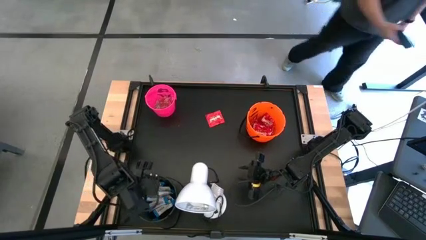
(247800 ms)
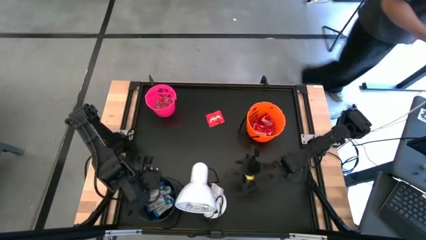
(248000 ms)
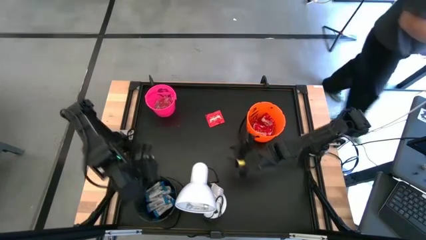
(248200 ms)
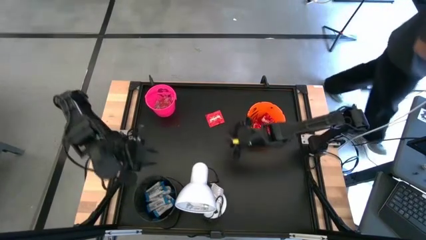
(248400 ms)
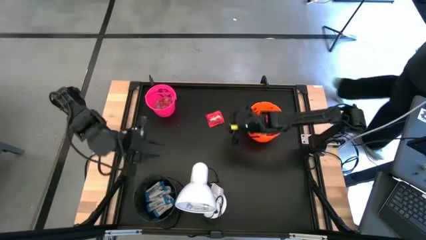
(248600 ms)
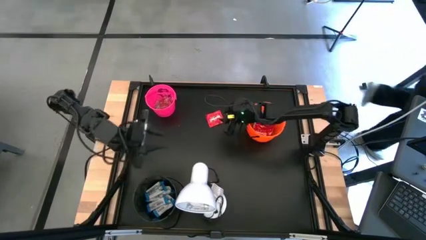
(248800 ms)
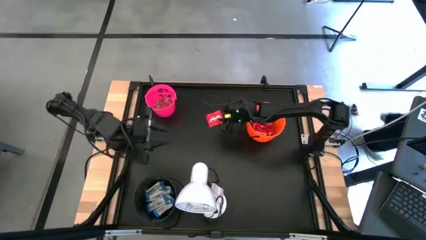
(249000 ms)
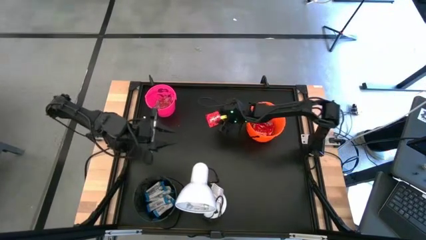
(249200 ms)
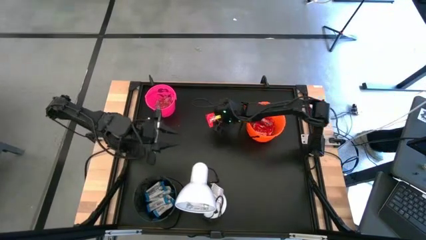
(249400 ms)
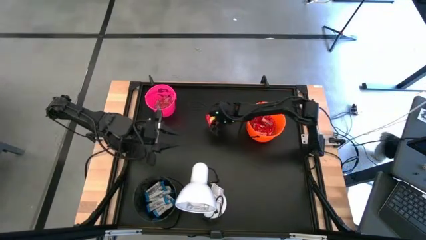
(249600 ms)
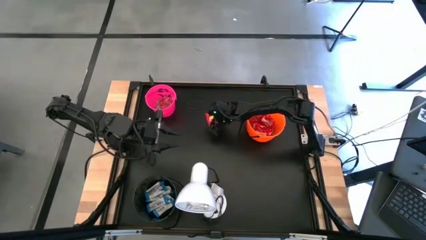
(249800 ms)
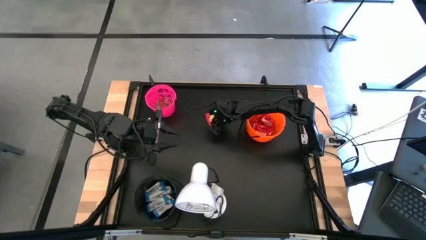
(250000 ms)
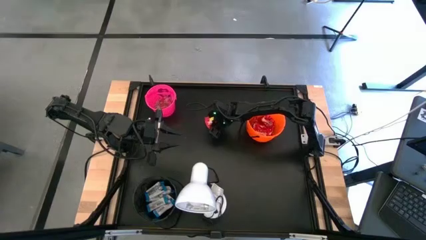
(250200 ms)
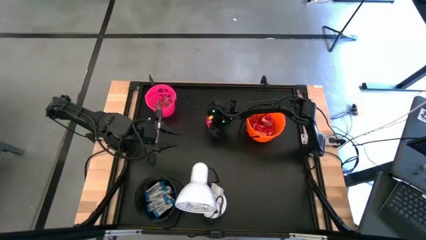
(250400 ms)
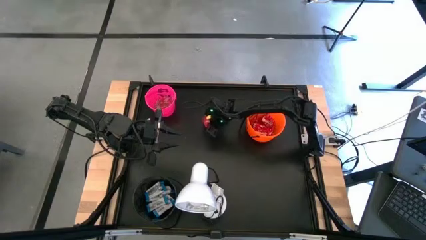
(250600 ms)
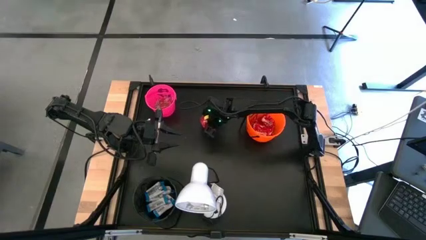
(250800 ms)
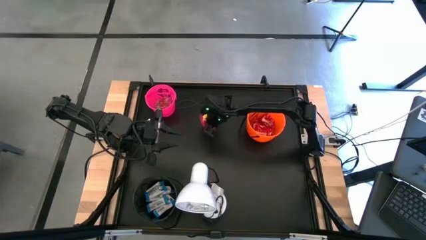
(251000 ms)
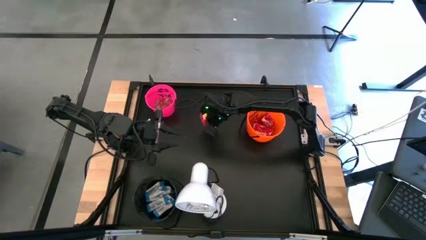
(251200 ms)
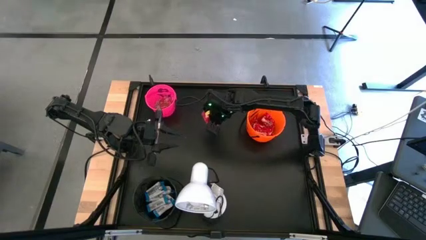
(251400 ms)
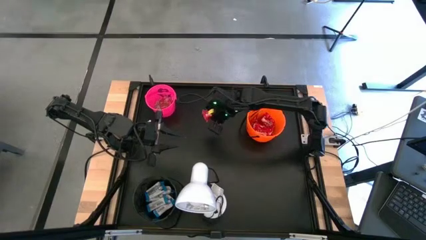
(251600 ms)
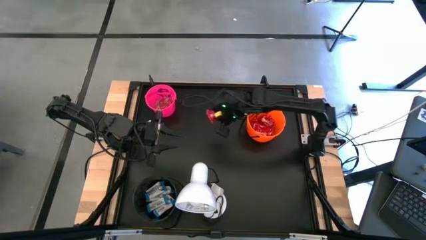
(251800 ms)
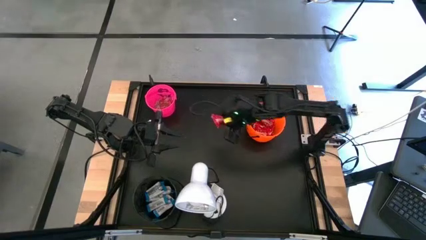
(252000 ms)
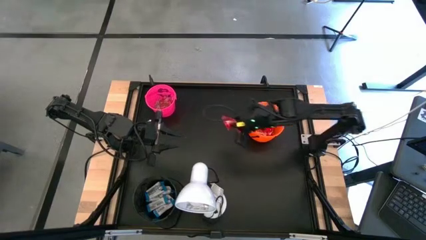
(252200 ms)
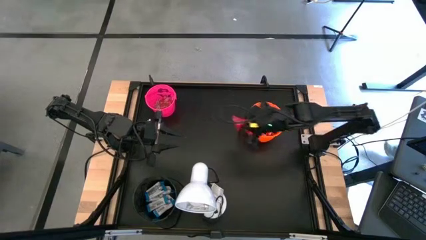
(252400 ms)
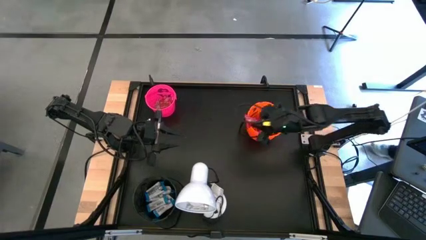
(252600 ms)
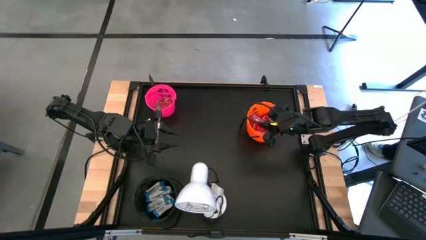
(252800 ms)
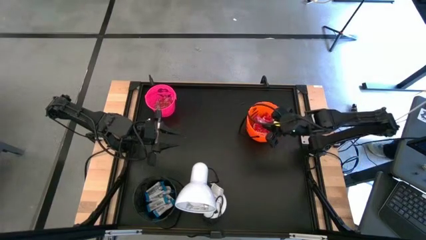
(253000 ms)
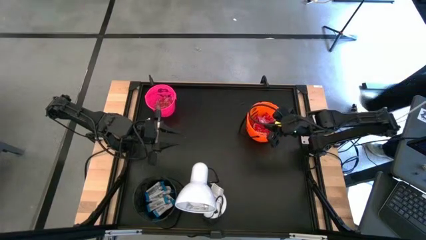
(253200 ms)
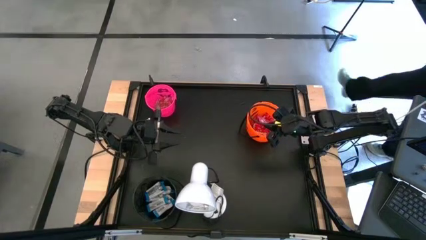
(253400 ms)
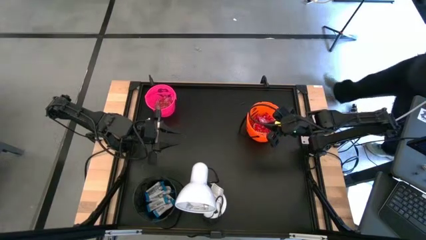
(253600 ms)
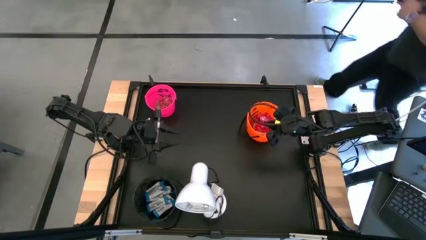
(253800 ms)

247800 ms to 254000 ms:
Task: Sort candy
Put the red candy into the orange bucket

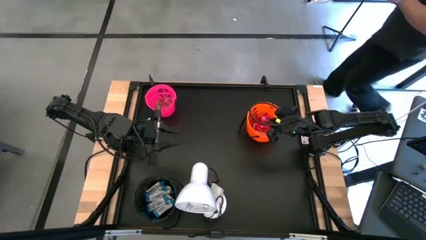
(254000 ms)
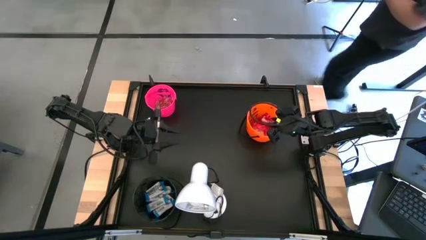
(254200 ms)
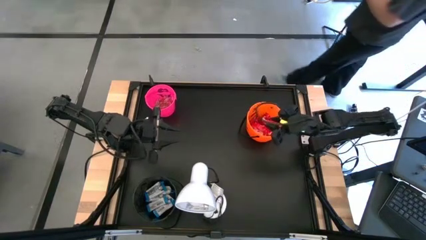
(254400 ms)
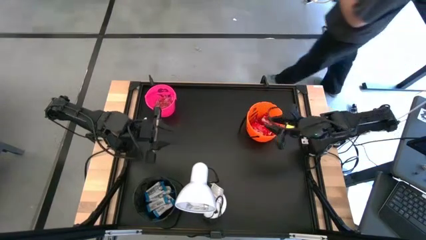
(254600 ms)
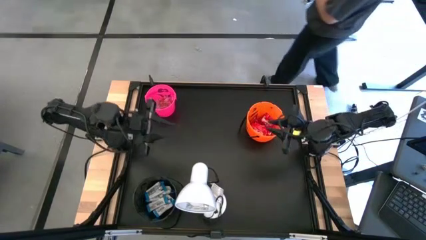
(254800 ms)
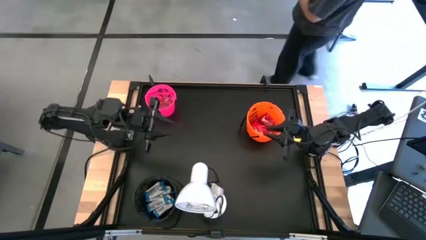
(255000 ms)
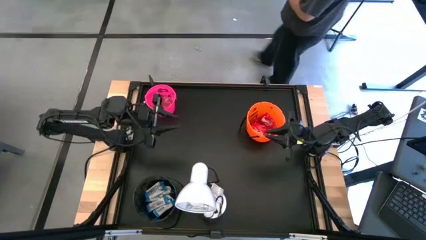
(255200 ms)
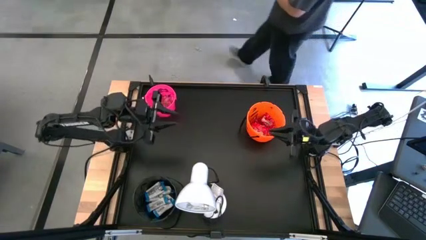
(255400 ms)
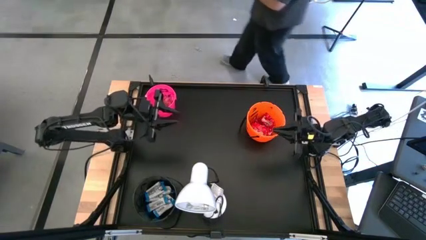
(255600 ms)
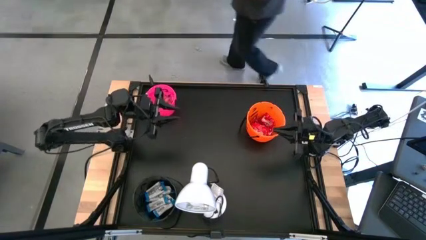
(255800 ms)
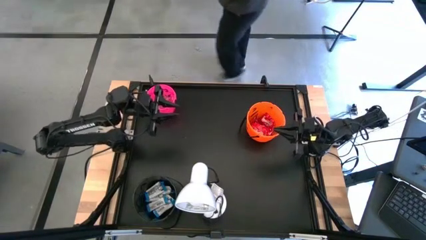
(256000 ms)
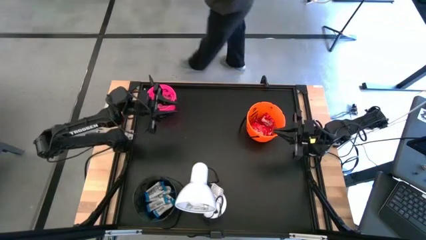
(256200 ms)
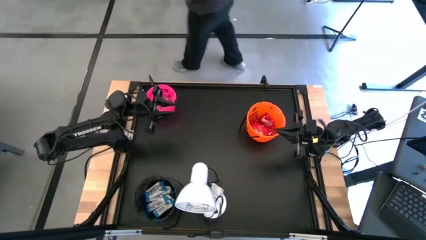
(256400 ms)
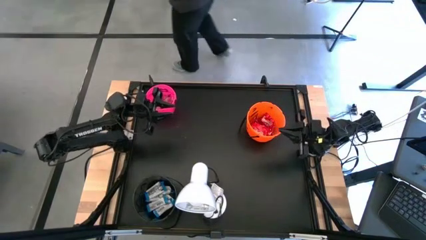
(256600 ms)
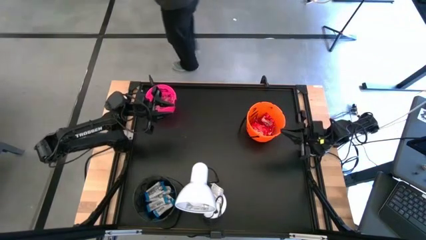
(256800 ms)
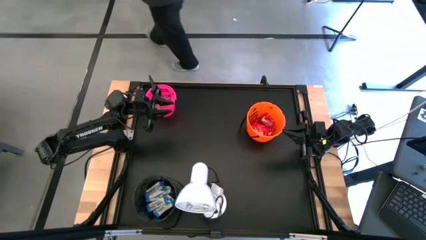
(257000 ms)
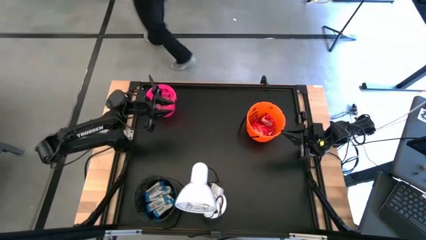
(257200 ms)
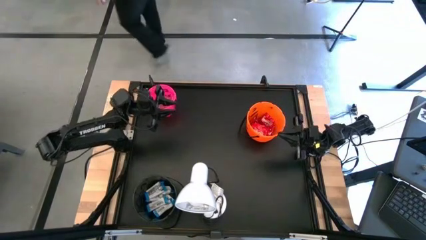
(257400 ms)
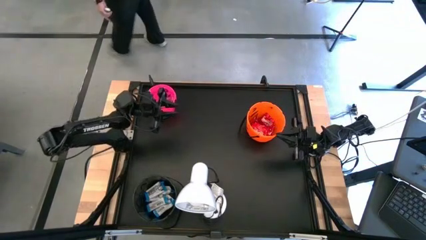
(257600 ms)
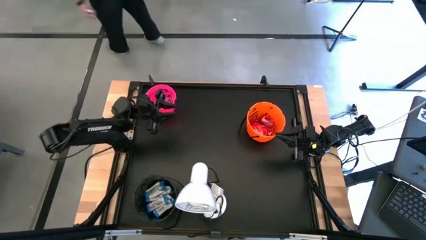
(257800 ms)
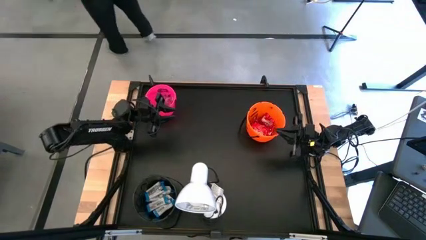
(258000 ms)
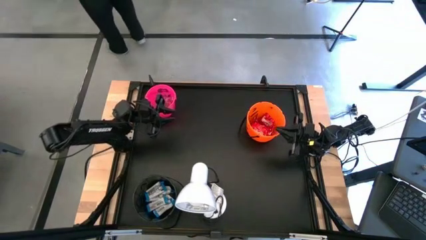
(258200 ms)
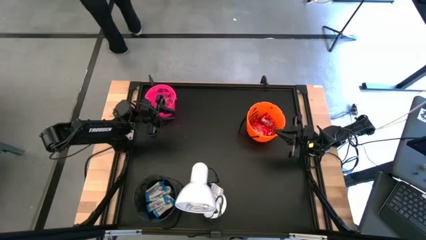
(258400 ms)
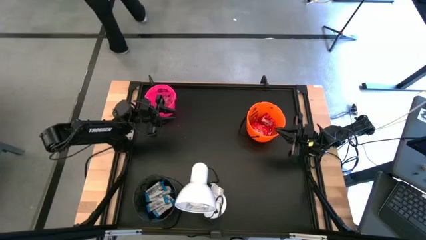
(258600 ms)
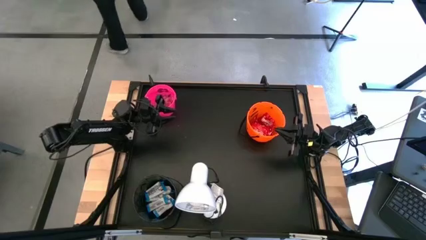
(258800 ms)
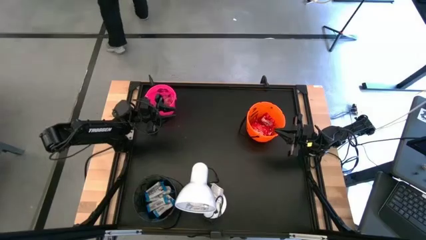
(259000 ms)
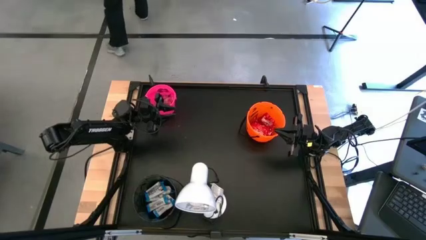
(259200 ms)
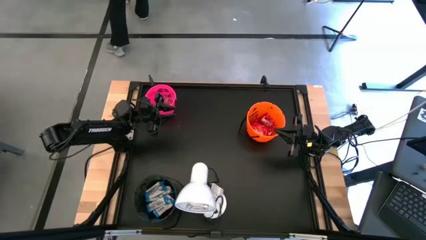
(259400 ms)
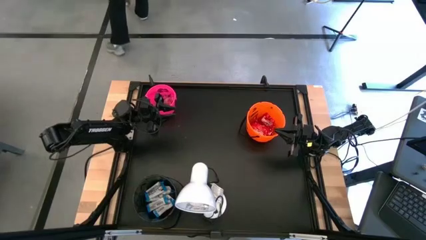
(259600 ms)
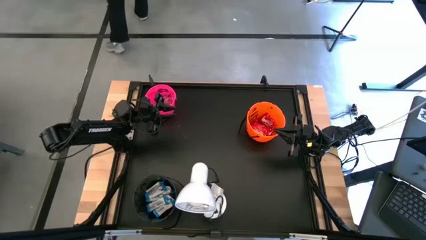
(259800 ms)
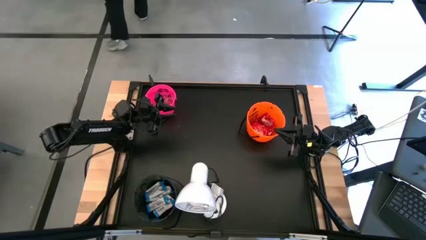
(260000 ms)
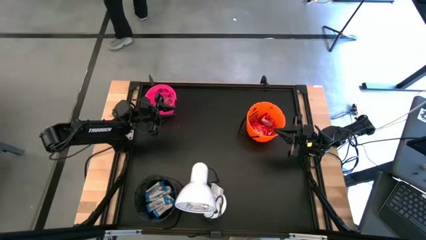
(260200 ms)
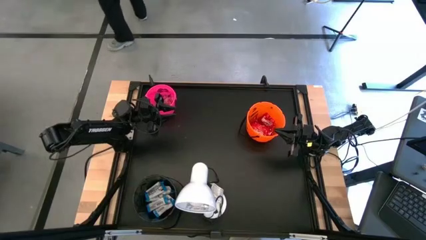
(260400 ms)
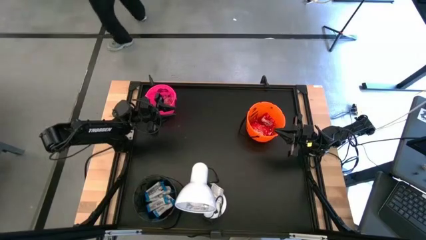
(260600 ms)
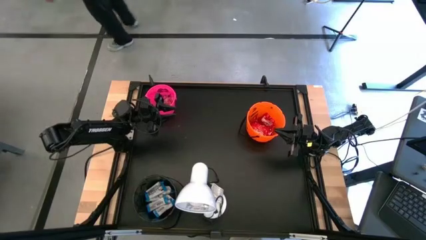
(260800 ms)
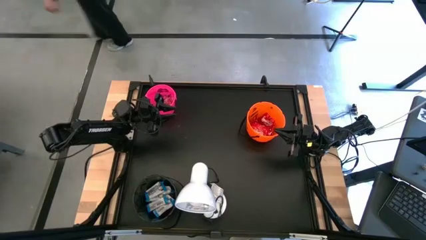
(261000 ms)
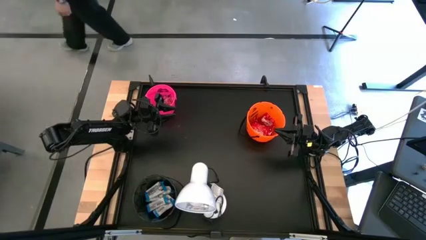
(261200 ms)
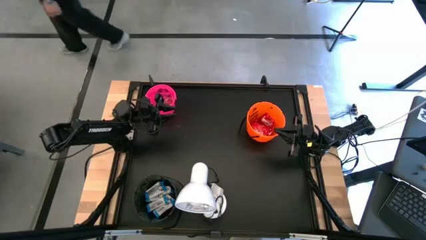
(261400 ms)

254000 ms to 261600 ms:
Return to Home Position
